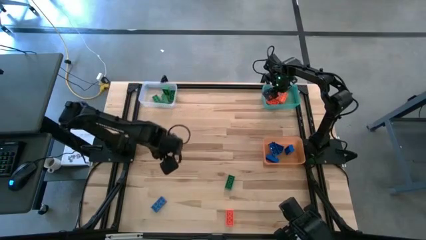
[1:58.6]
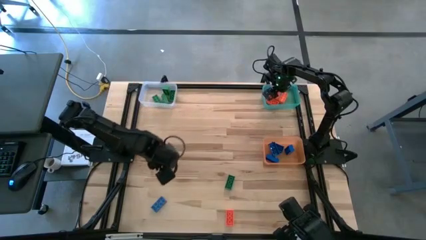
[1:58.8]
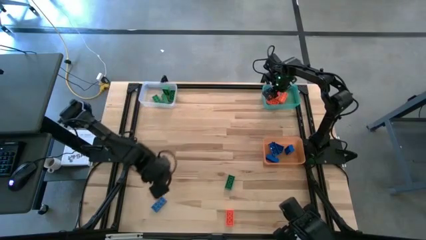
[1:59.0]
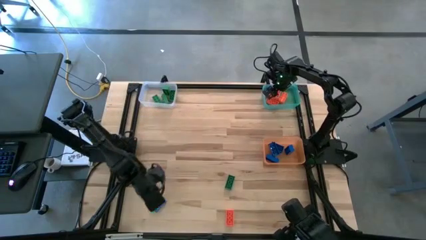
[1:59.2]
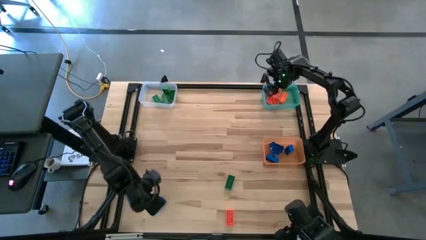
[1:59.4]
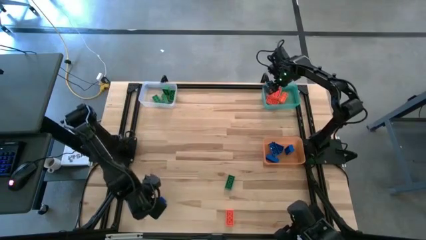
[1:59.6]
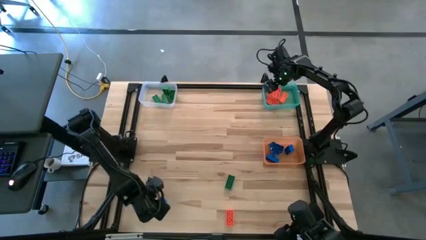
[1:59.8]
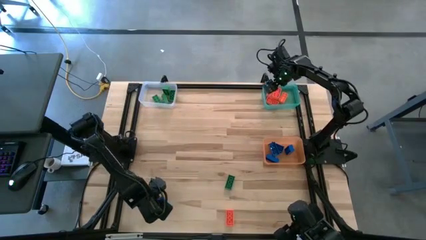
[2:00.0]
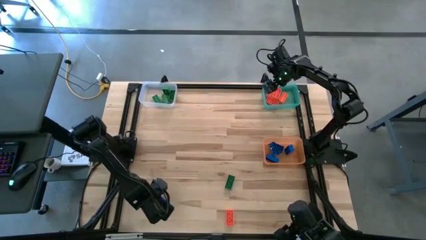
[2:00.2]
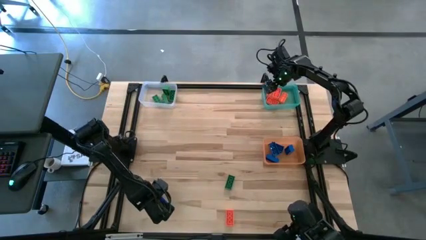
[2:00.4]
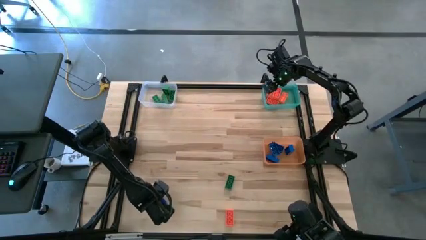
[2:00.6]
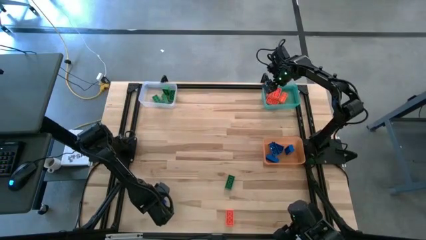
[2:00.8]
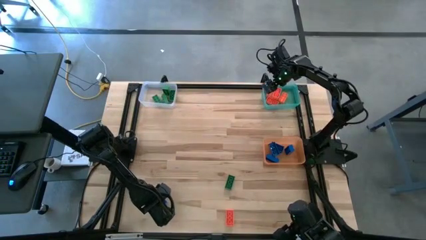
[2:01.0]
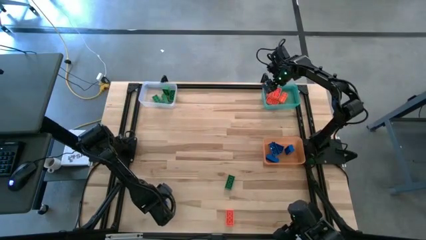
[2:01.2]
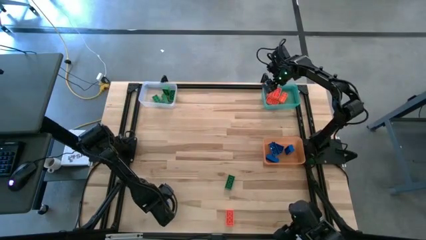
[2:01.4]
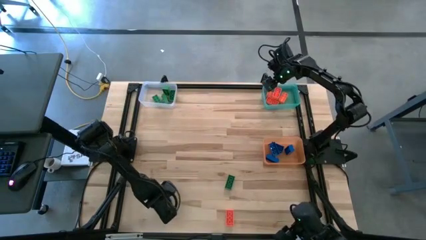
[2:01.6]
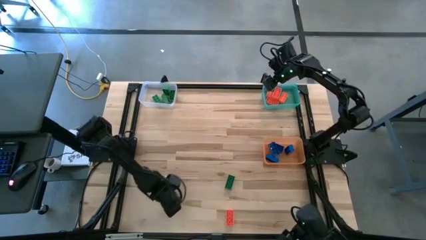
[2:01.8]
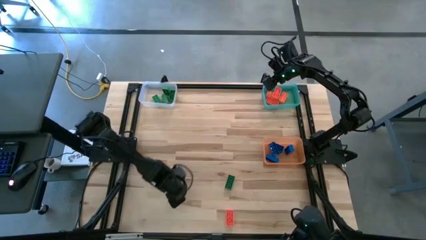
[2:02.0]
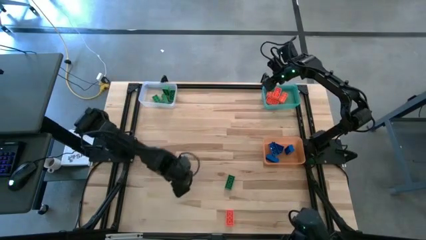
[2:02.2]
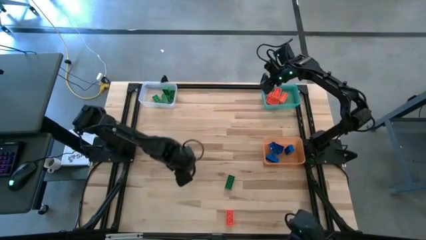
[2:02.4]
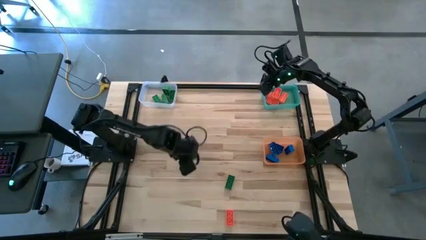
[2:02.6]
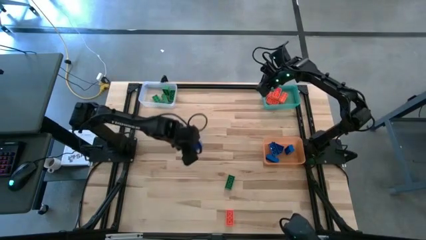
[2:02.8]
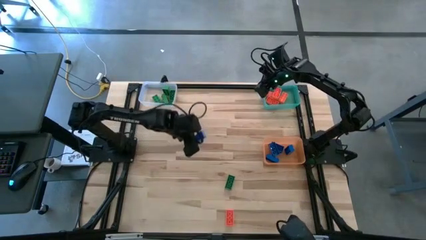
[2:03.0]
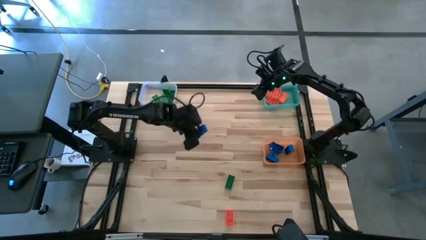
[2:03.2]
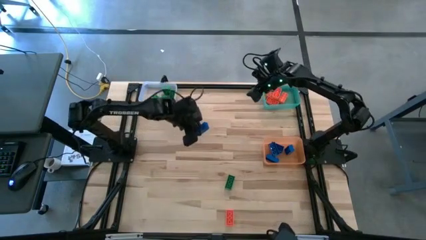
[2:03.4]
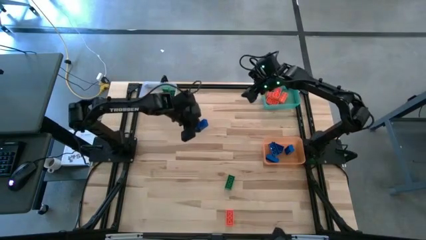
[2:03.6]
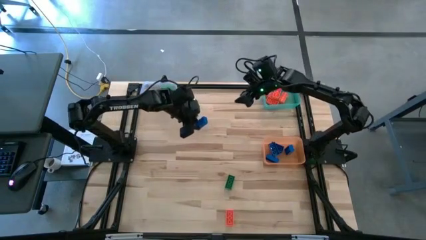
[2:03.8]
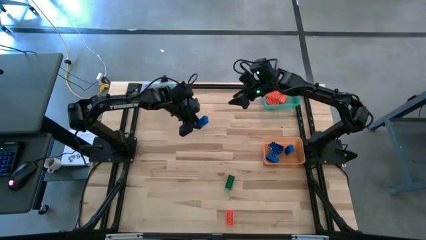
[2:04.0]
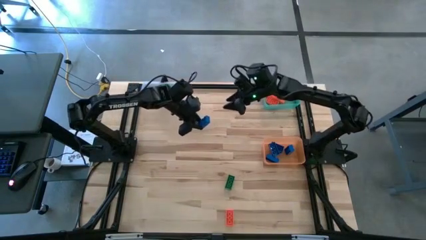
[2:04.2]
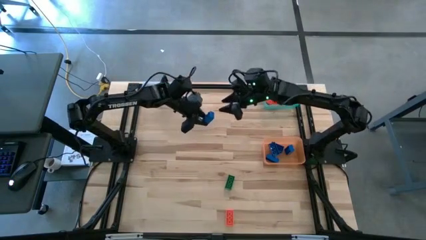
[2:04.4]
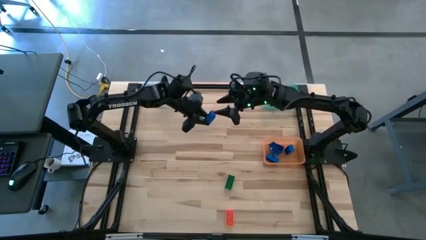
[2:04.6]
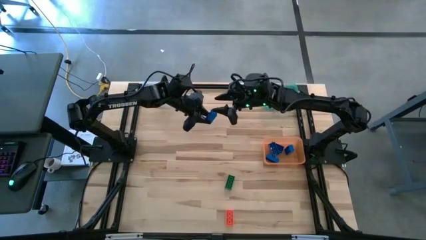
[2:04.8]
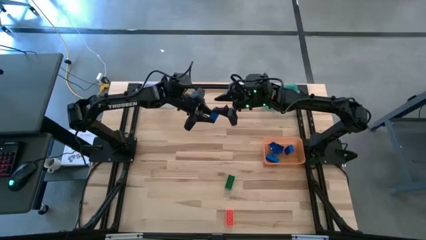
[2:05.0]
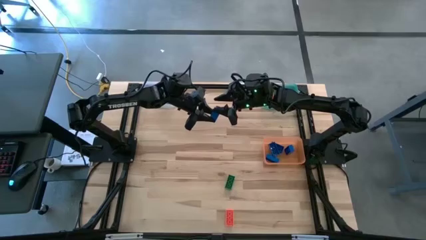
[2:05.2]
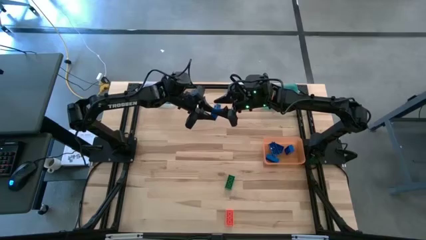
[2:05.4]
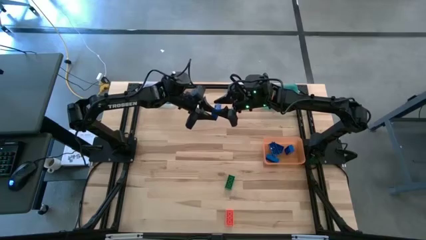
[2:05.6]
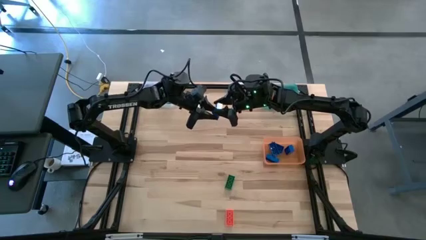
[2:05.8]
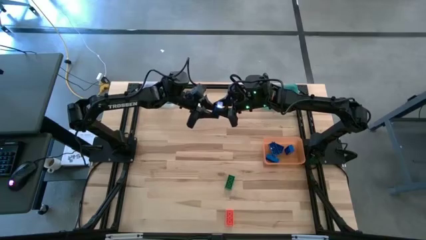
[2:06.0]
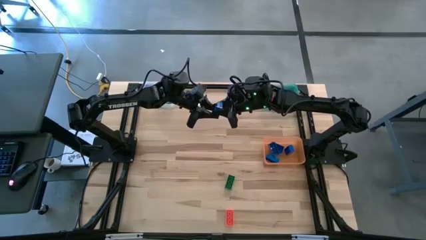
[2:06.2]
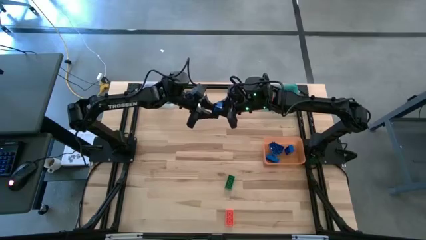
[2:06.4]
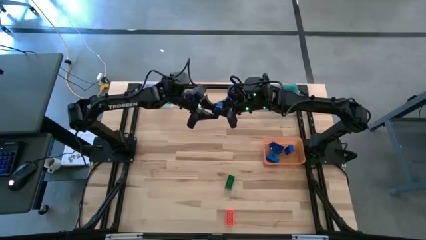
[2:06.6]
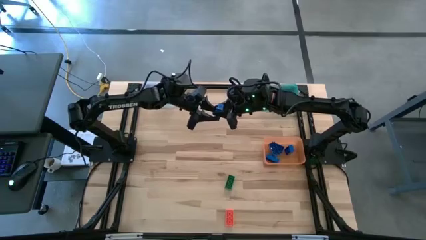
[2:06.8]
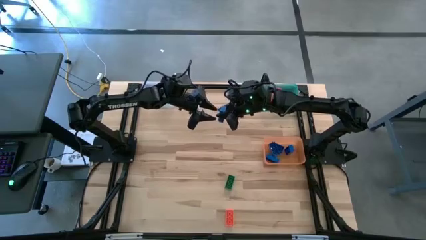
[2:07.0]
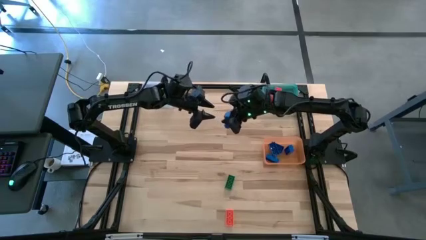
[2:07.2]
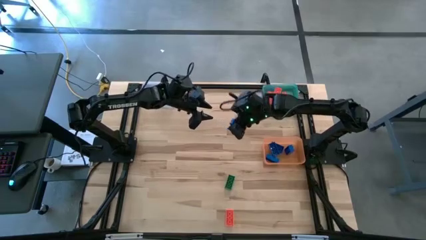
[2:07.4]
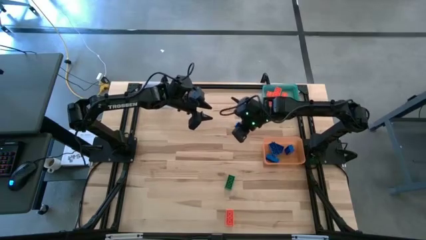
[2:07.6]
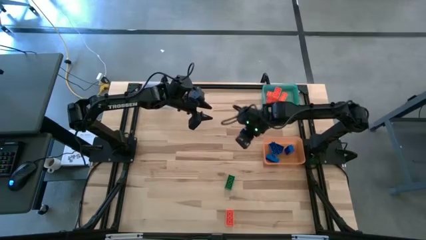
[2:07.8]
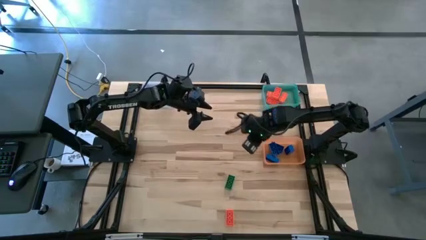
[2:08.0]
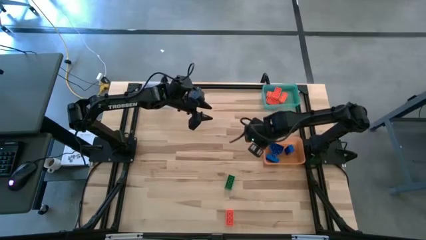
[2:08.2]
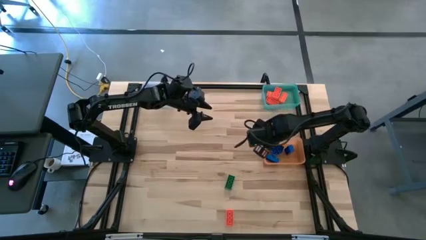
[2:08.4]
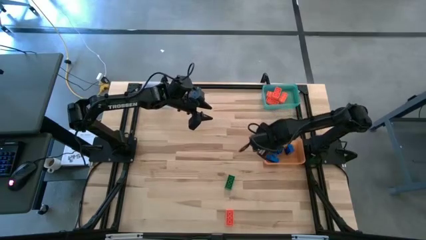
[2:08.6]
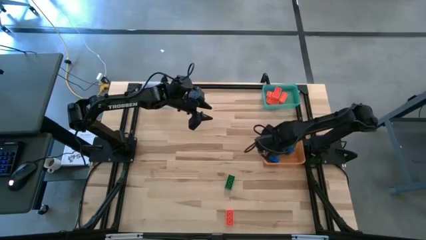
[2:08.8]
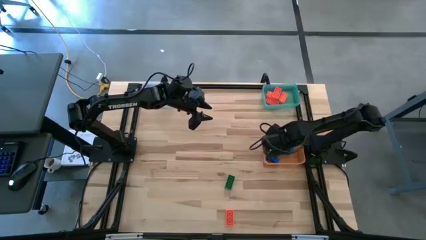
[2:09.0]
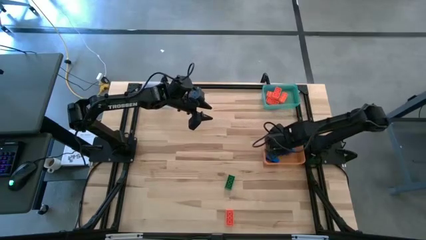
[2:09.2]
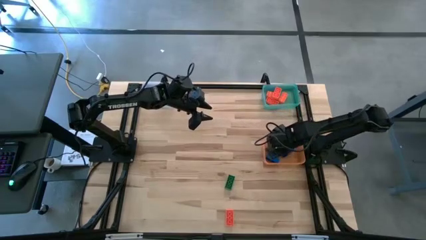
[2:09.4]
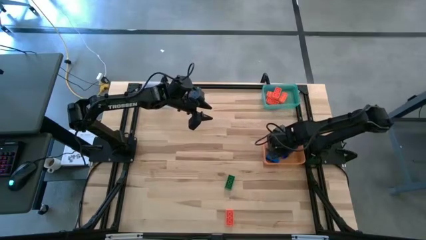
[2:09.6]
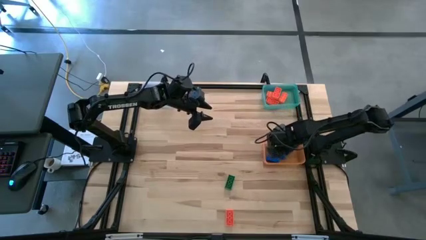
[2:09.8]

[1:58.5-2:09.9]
Task: Sort & place blocks by color
Put the blue game piece into the orange bin

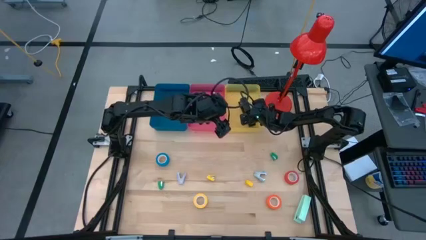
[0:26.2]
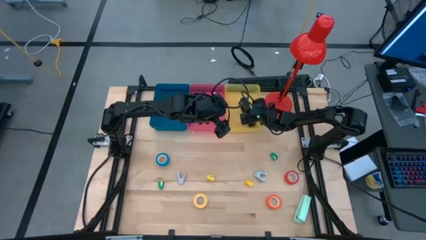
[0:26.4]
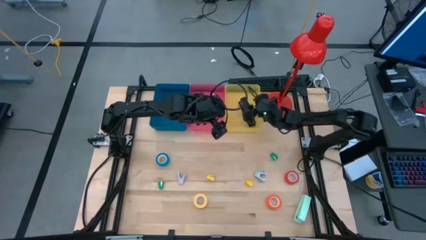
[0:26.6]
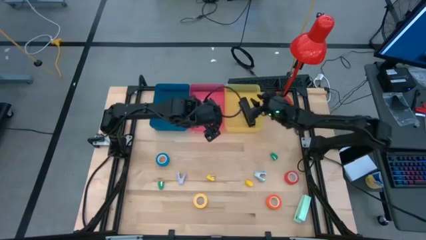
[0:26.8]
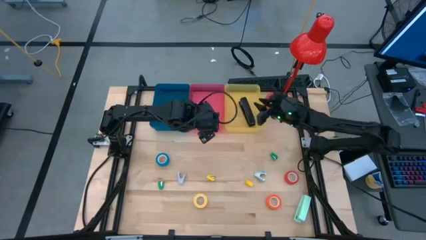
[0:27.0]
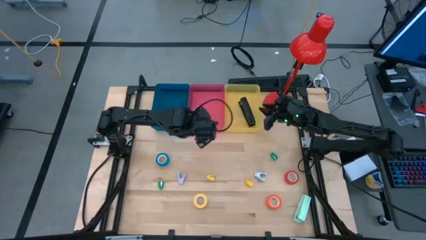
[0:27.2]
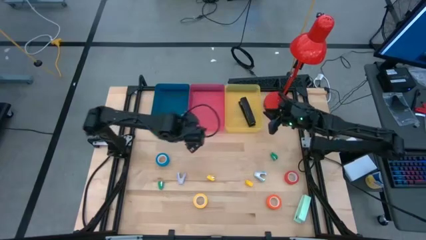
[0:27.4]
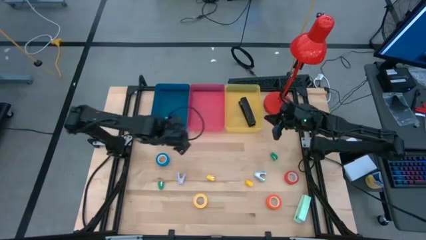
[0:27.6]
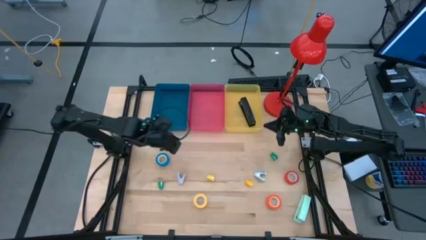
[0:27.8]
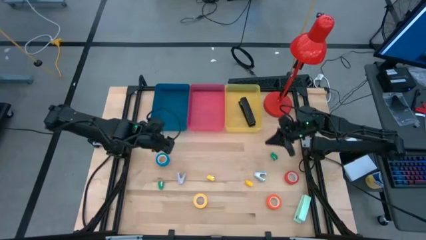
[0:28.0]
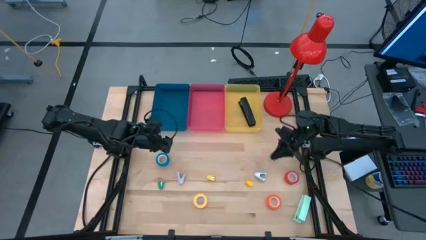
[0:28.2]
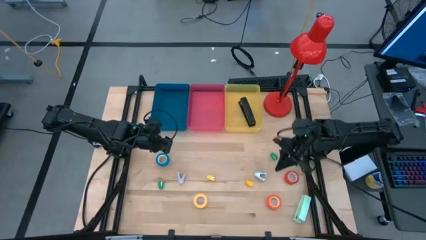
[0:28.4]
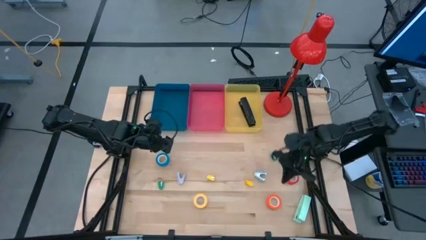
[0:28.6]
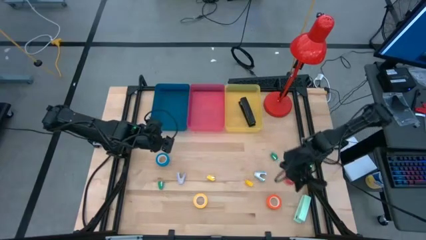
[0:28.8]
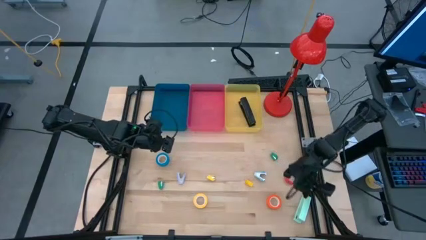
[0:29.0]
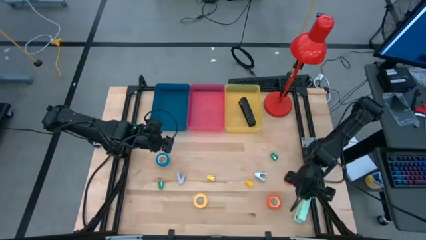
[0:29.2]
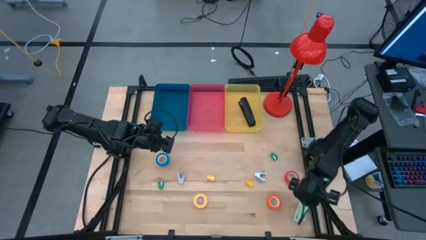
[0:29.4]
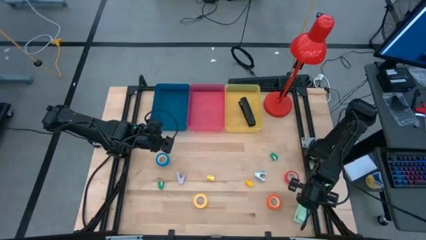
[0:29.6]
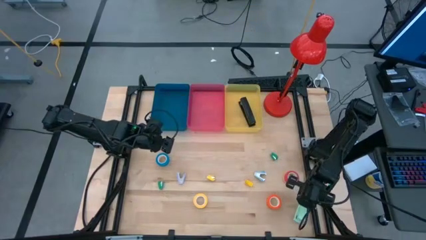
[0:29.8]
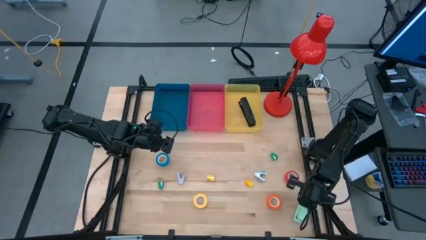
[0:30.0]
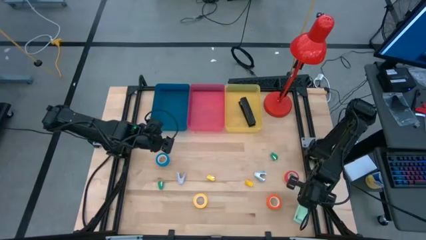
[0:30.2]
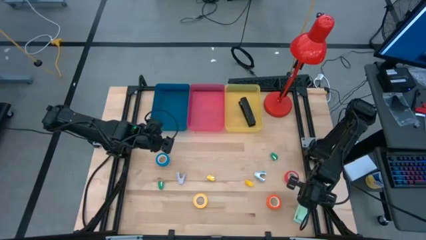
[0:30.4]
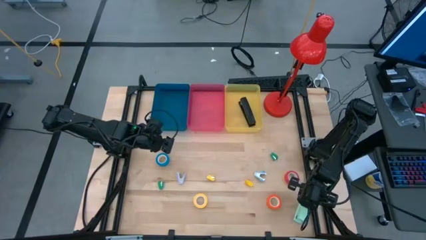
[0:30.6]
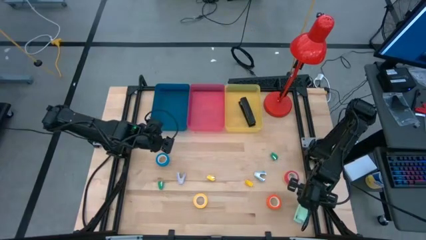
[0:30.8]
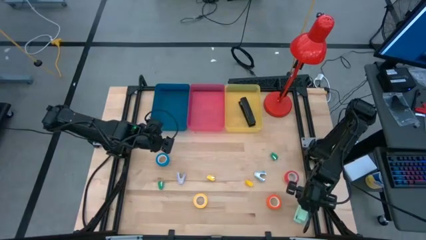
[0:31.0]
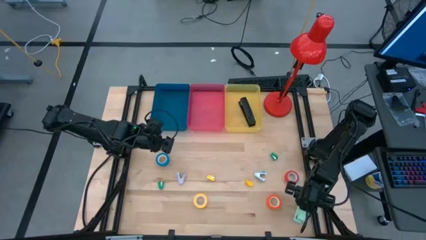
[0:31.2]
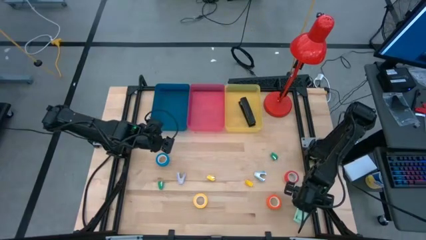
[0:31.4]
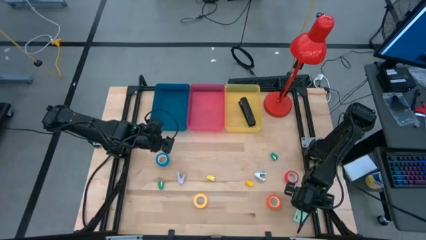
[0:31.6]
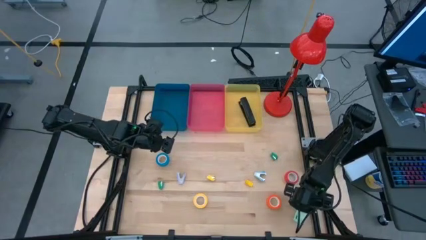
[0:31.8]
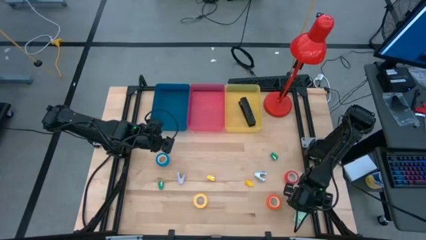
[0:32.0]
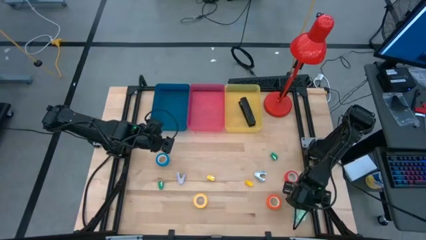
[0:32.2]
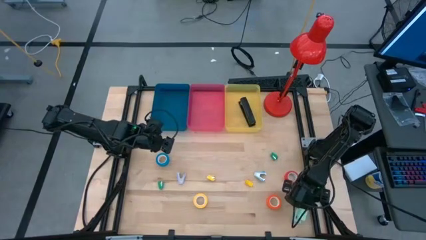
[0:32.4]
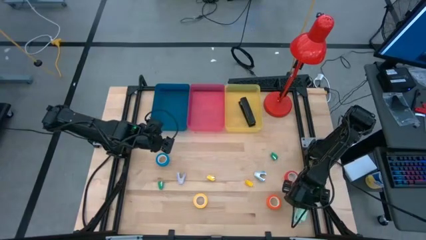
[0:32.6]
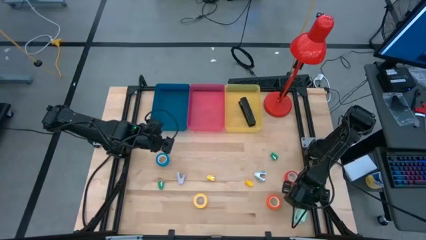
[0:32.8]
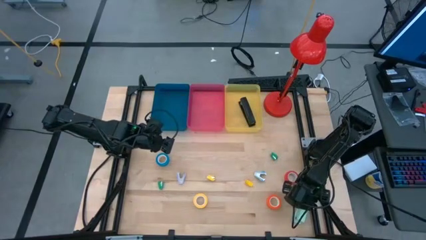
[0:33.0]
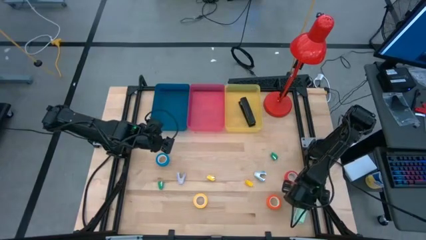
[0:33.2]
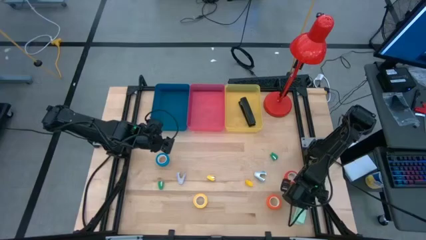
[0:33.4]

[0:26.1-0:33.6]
Task: Pick and place Stapler, Stapler remover, tape
Put the large light green stapler into the yellow bin
